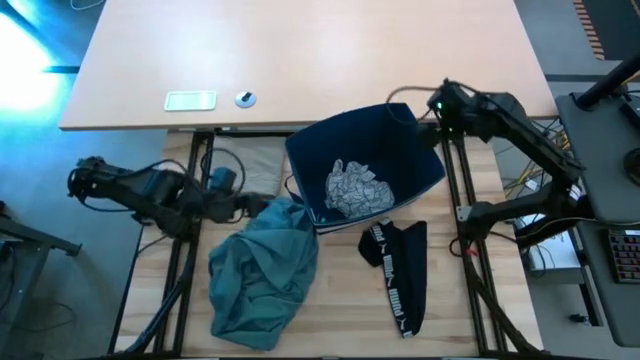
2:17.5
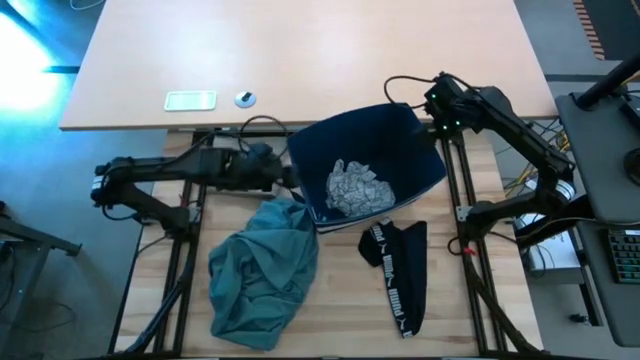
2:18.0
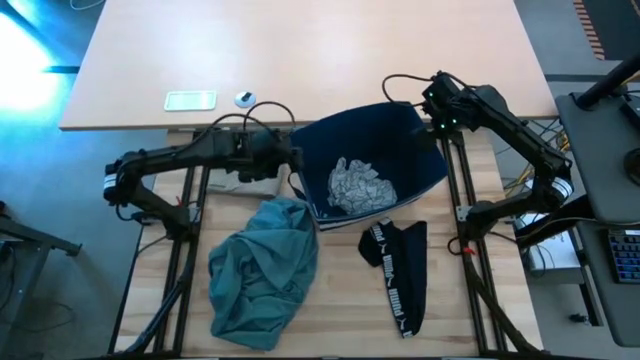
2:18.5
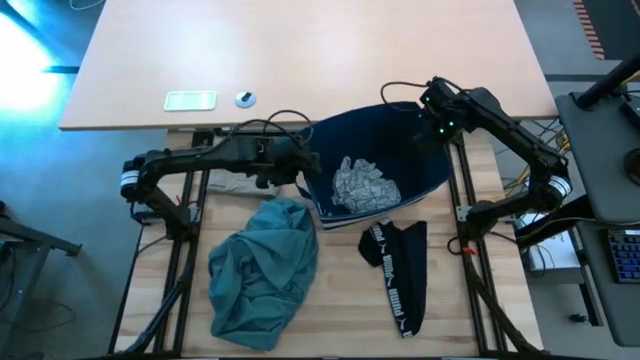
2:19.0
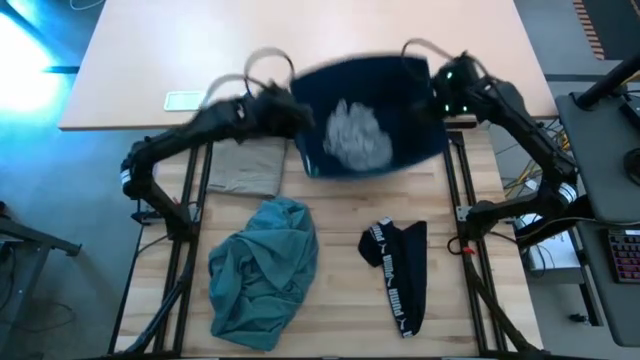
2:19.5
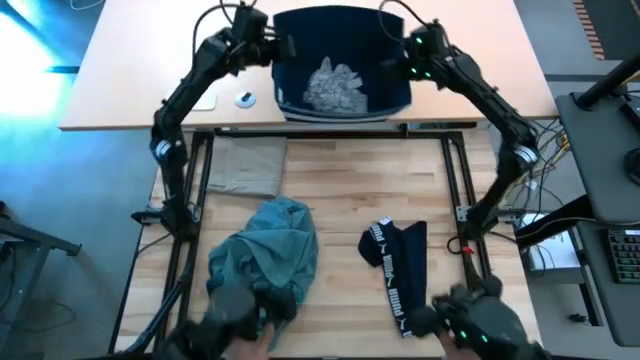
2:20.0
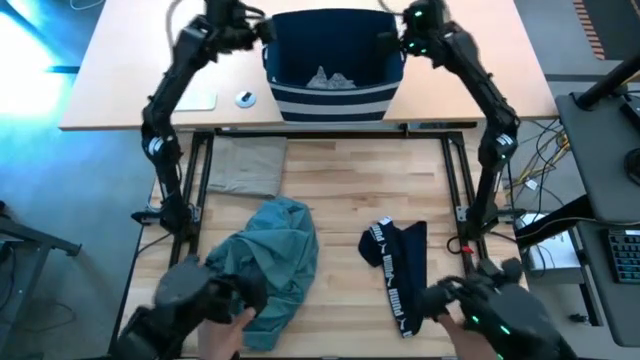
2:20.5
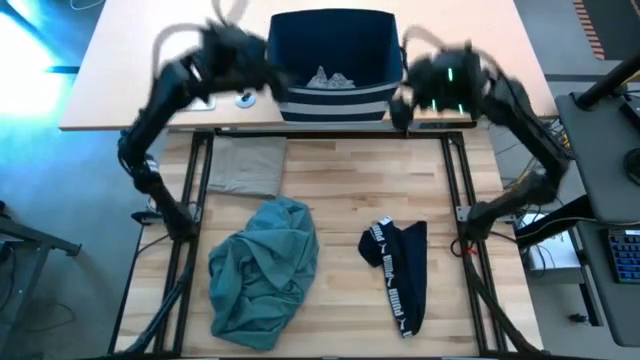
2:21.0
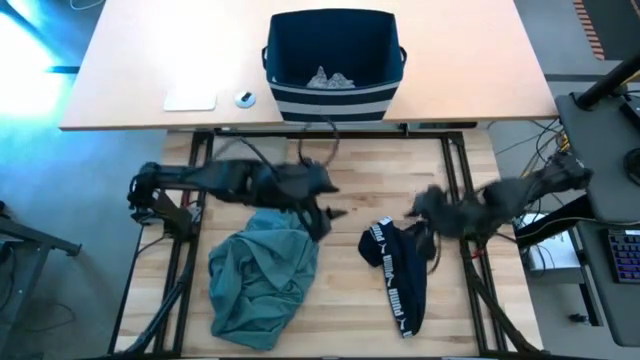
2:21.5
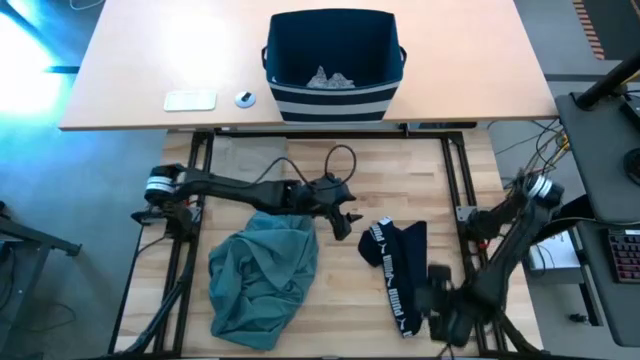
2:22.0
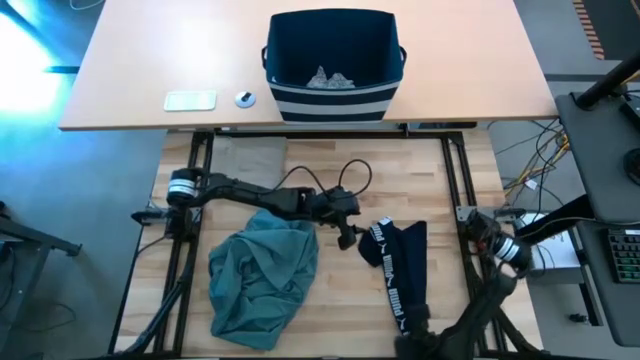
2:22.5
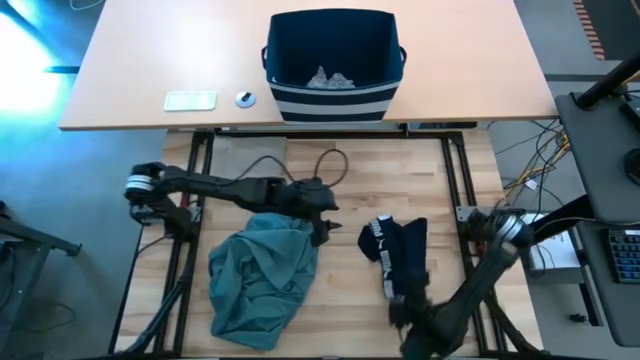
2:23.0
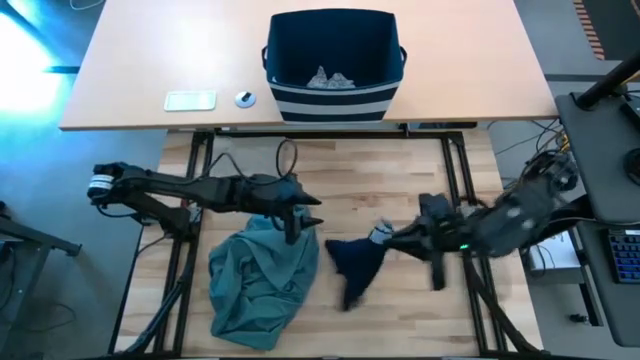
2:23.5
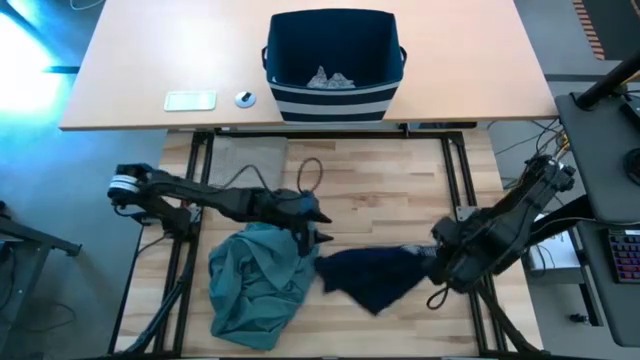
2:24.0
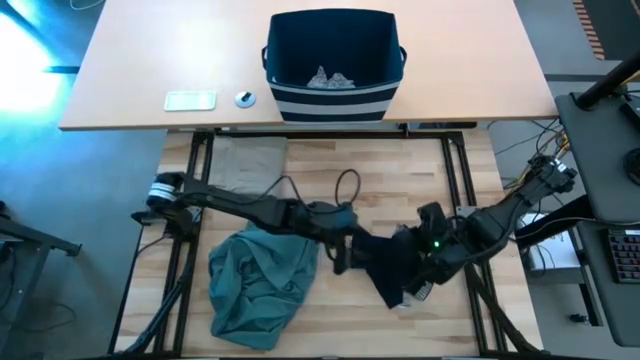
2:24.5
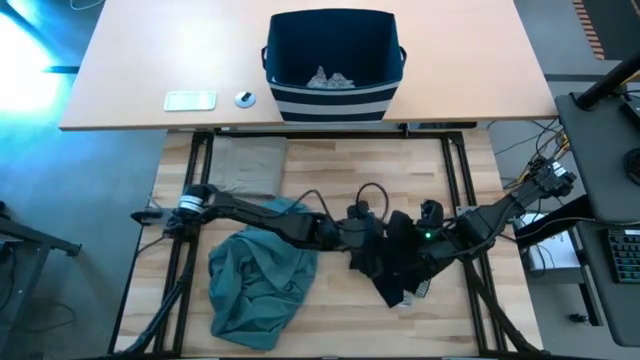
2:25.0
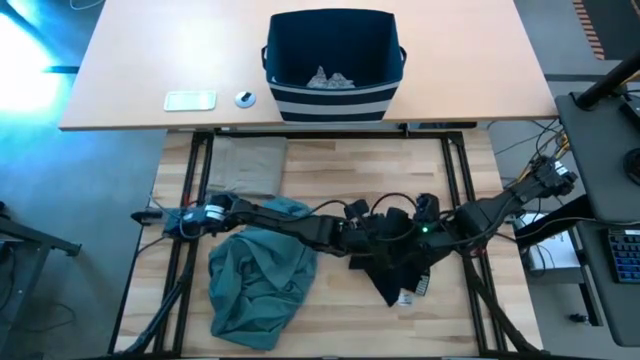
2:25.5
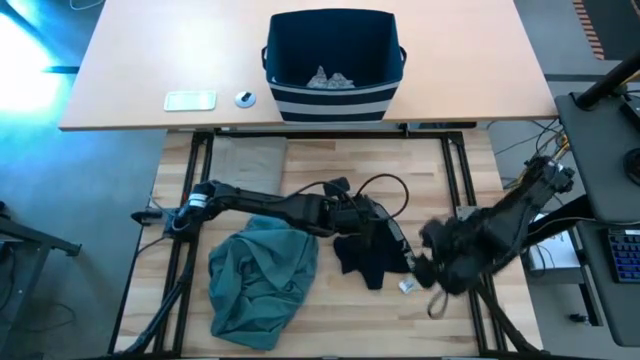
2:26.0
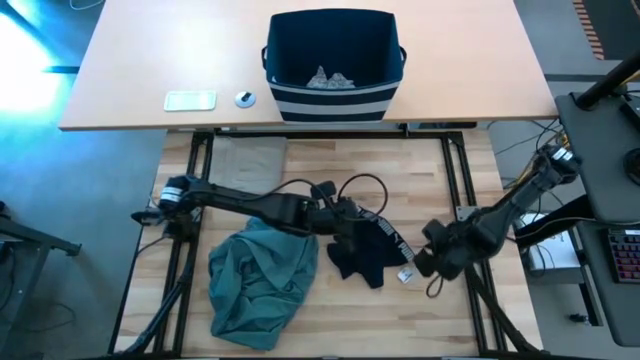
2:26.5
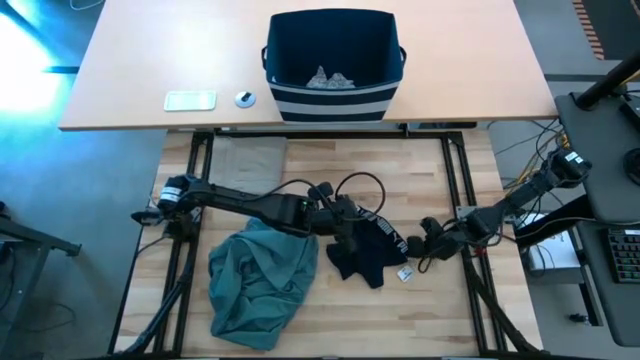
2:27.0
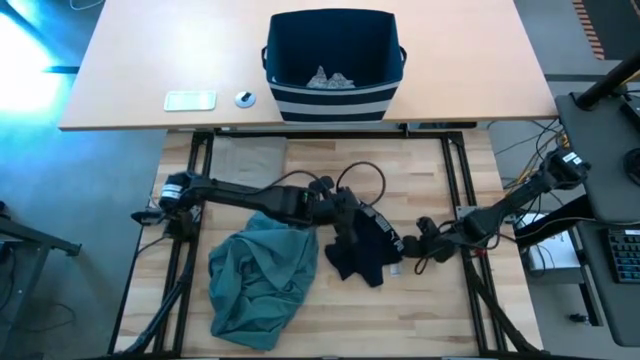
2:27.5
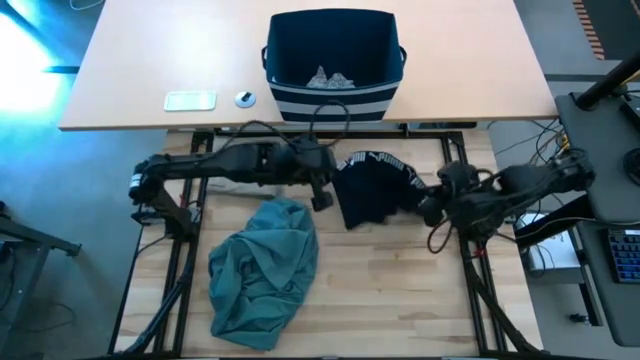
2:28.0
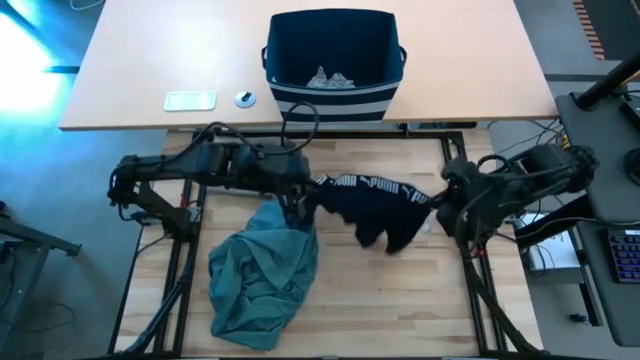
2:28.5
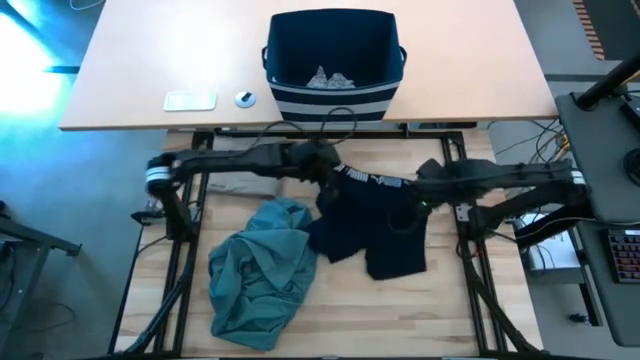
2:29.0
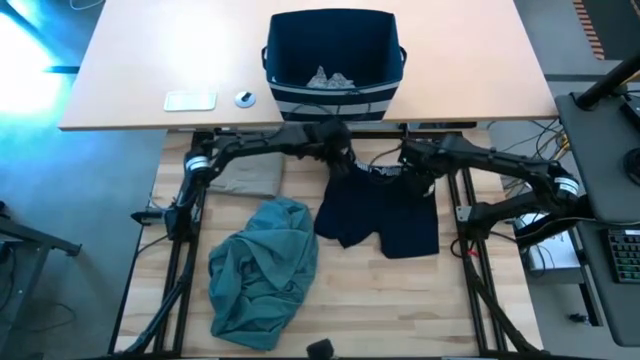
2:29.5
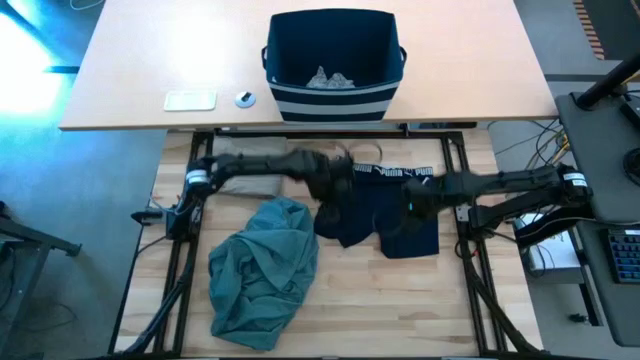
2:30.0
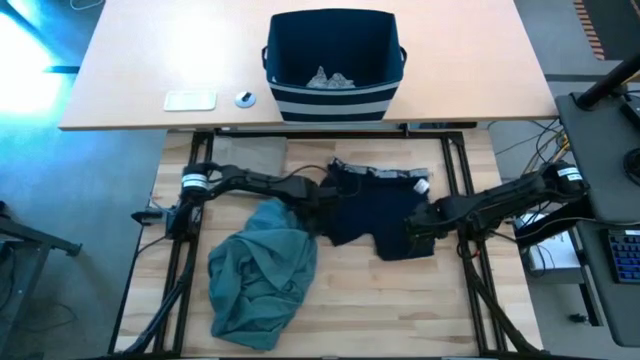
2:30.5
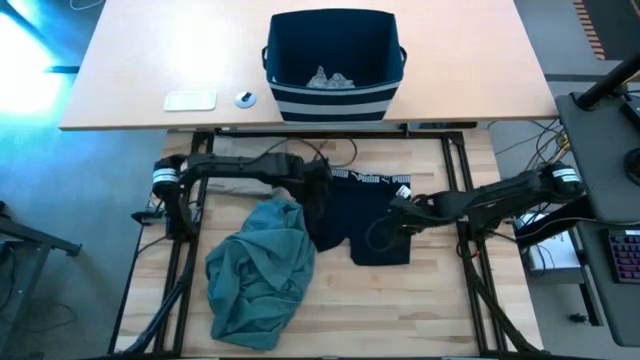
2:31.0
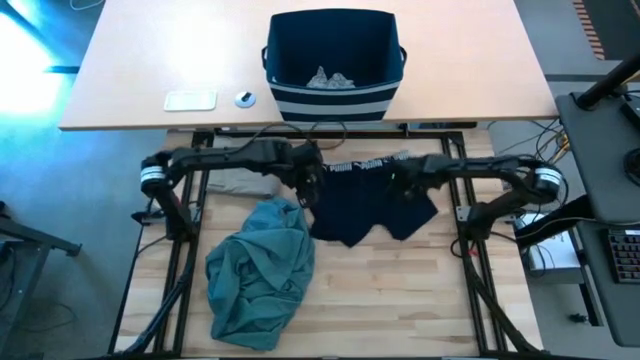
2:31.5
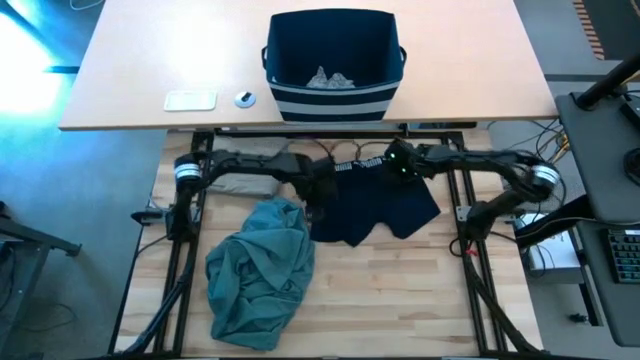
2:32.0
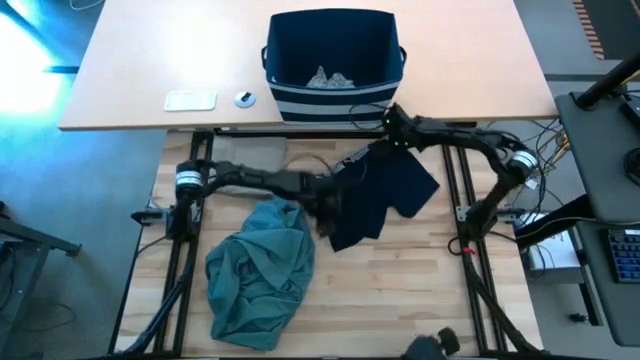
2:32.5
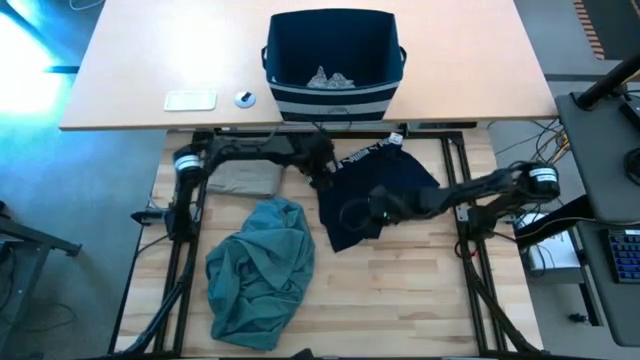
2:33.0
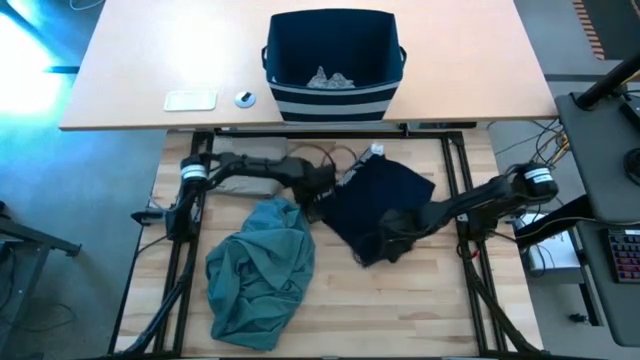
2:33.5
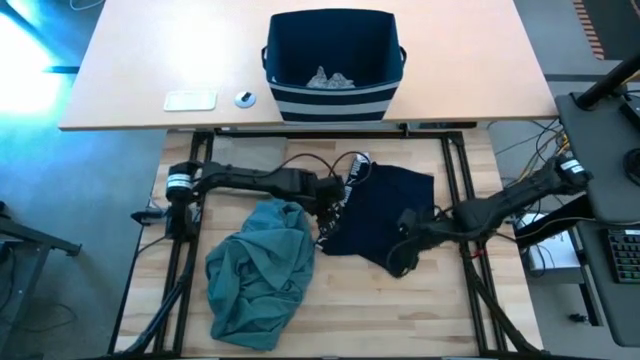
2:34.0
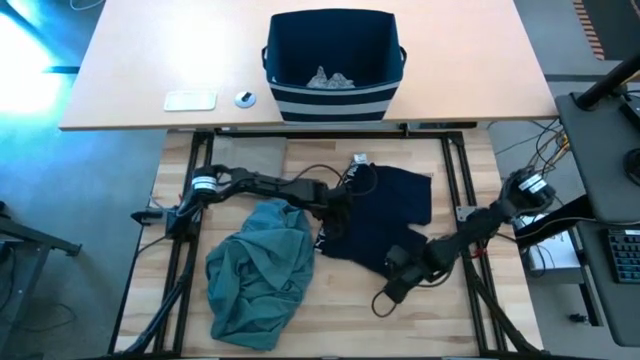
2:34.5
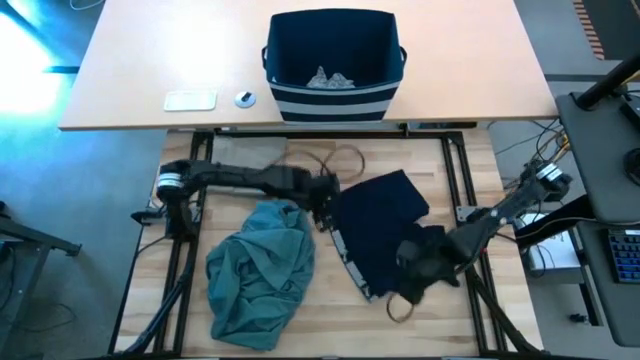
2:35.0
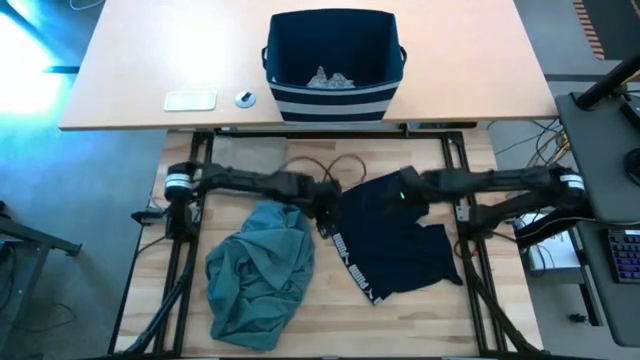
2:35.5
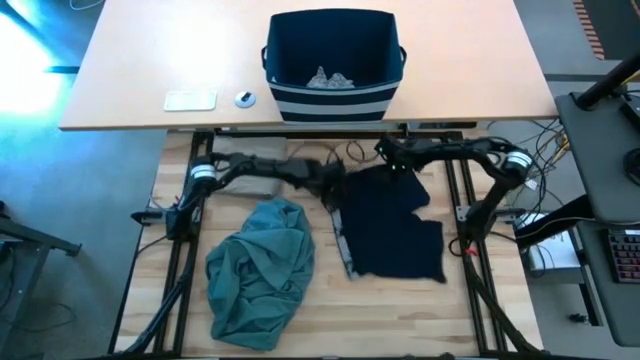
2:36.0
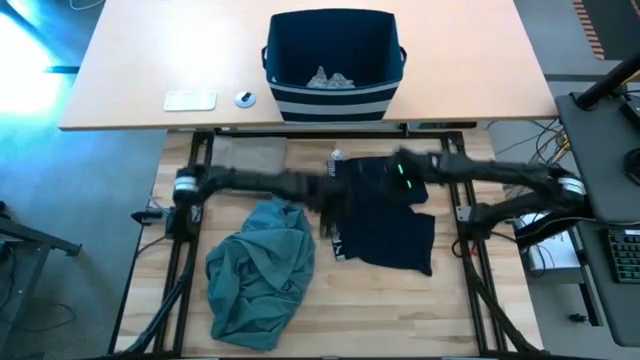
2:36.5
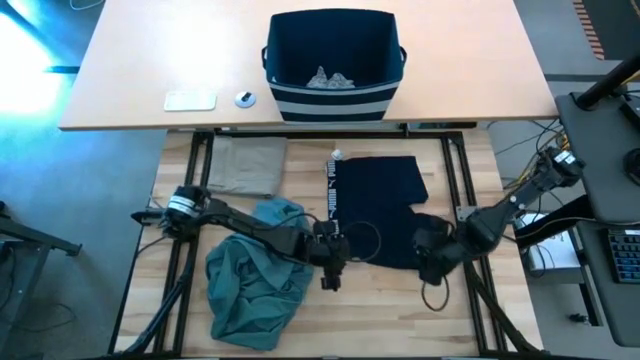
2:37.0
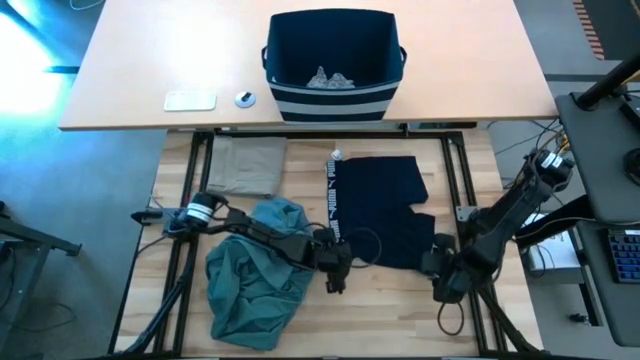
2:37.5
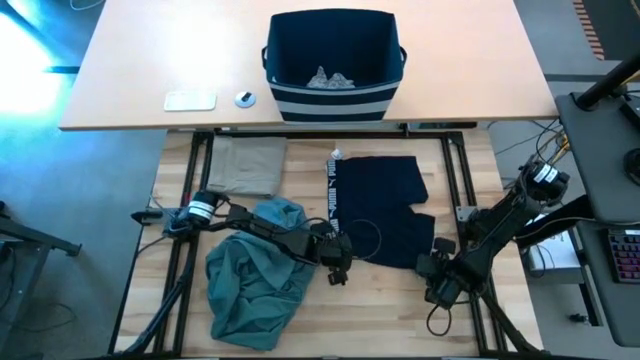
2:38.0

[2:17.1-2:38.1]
Task: Fold Laundry from Bin
Fold the black underwear
